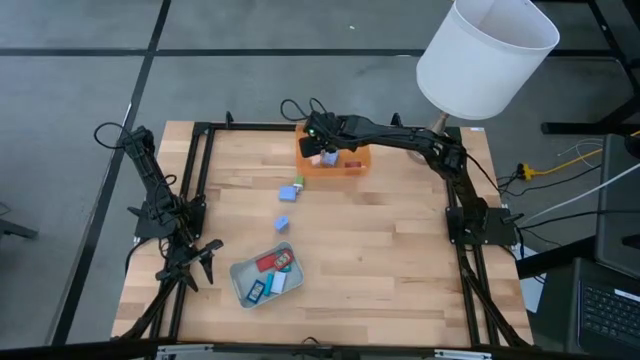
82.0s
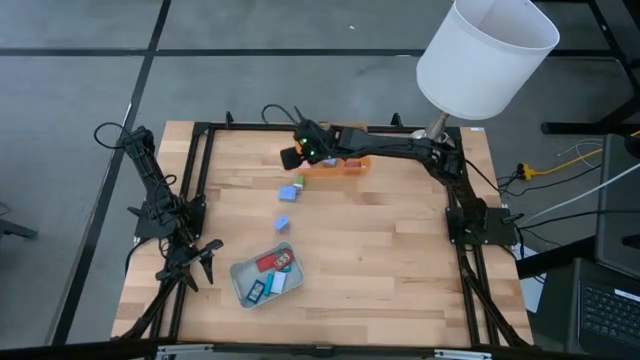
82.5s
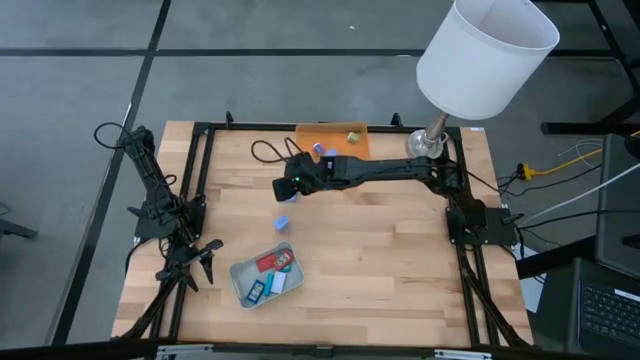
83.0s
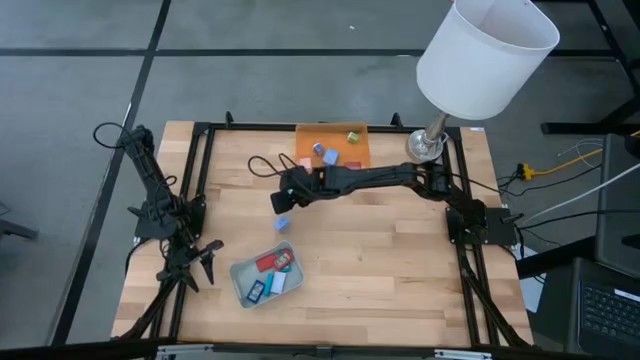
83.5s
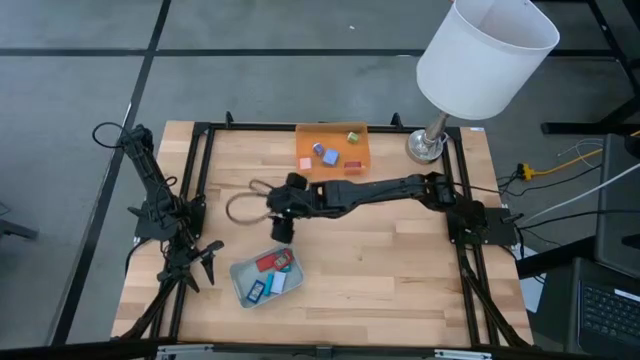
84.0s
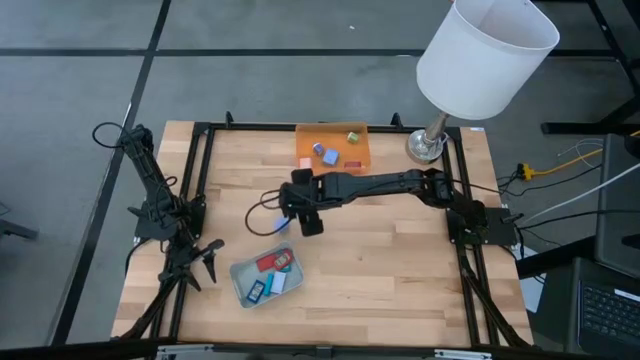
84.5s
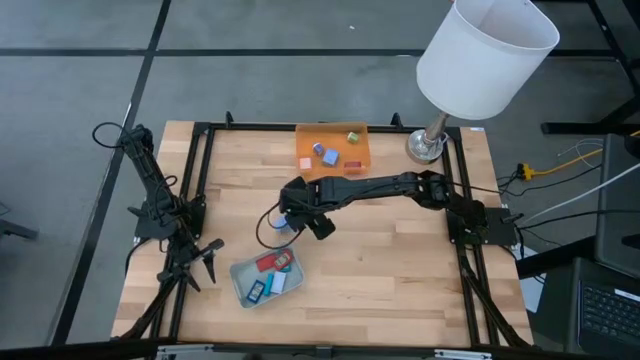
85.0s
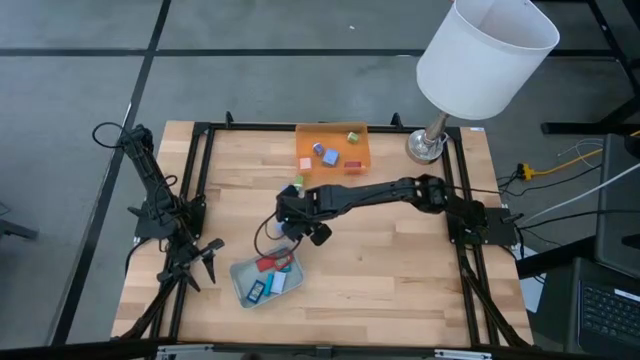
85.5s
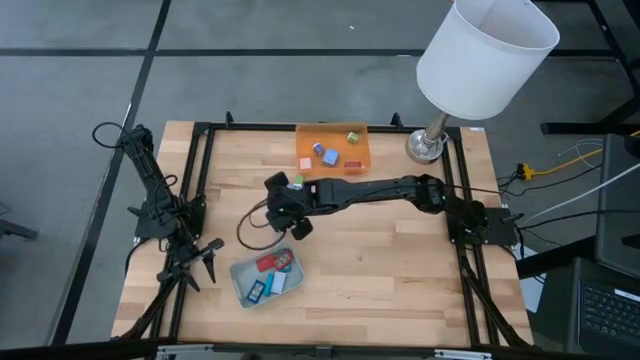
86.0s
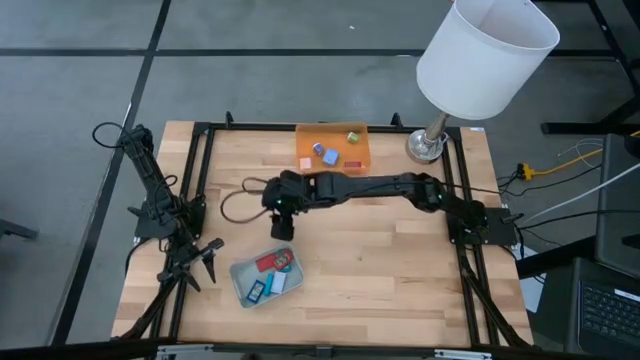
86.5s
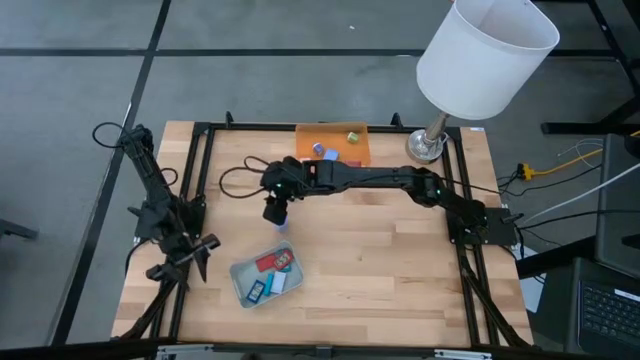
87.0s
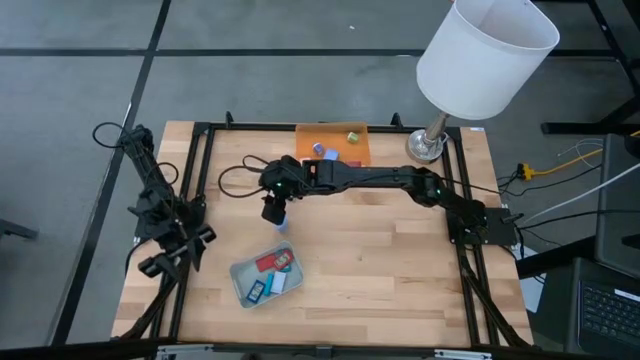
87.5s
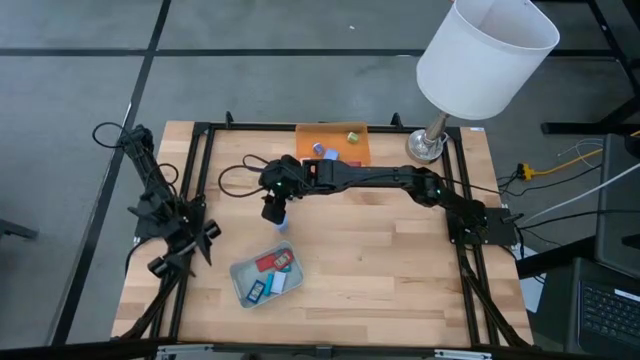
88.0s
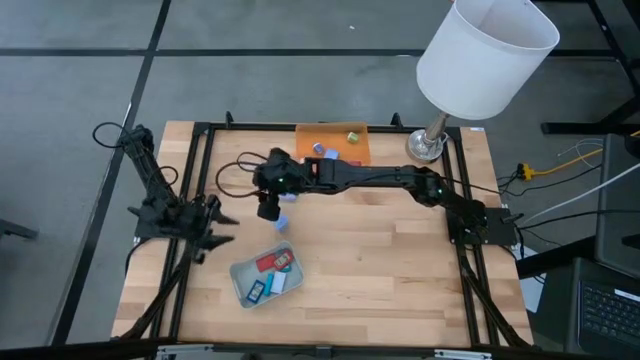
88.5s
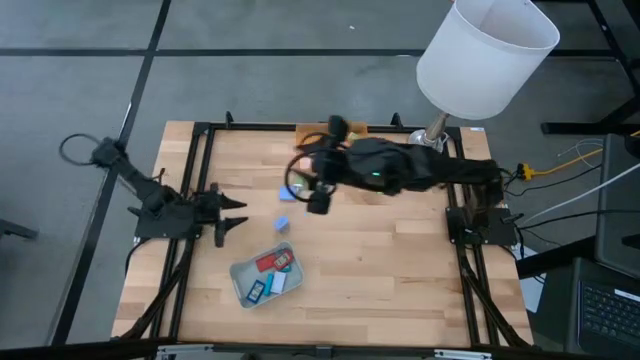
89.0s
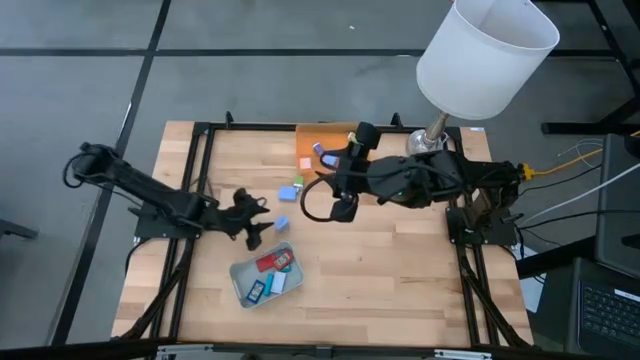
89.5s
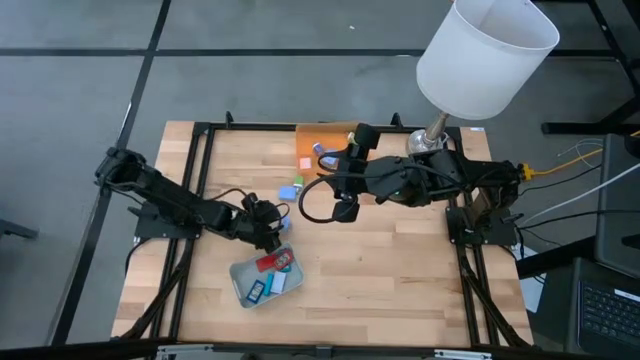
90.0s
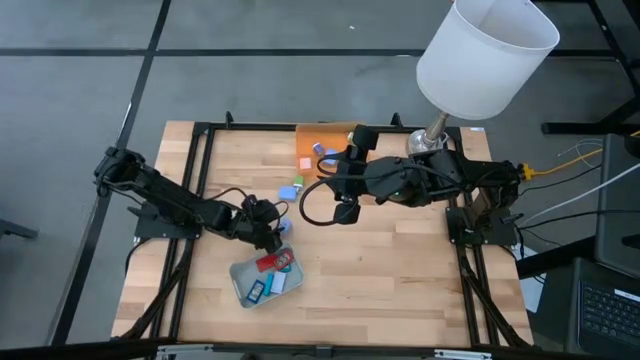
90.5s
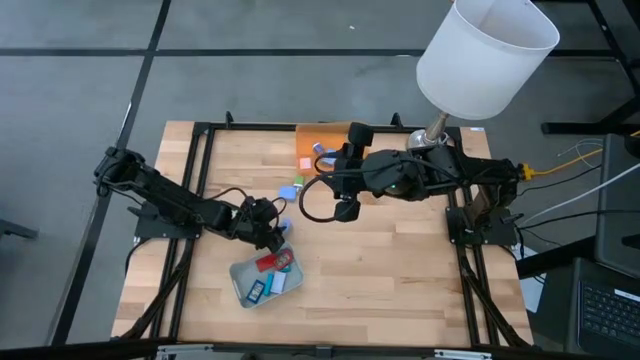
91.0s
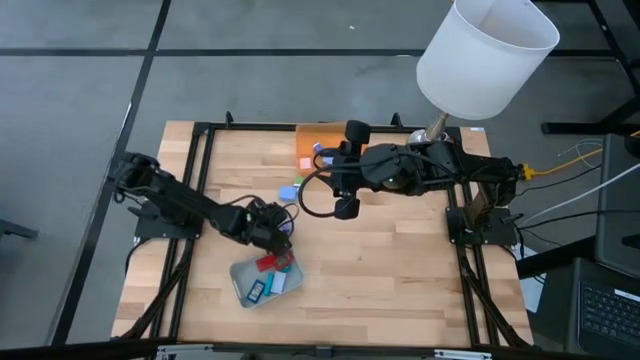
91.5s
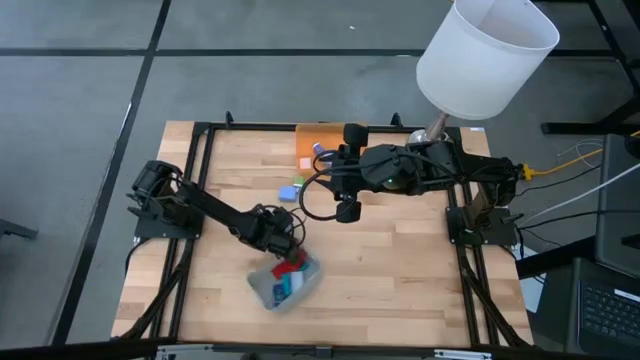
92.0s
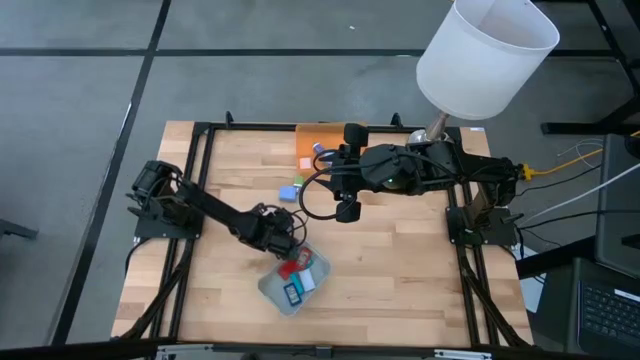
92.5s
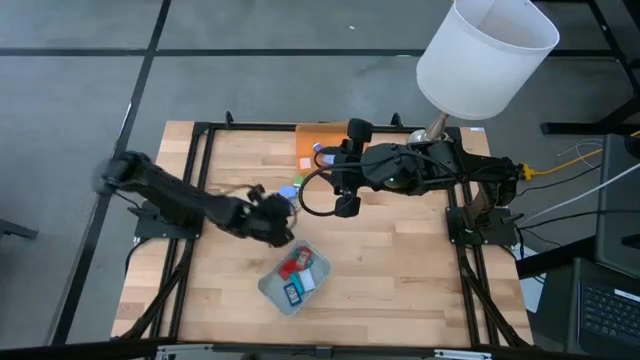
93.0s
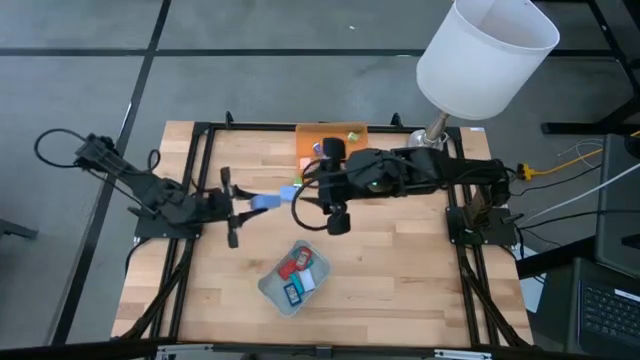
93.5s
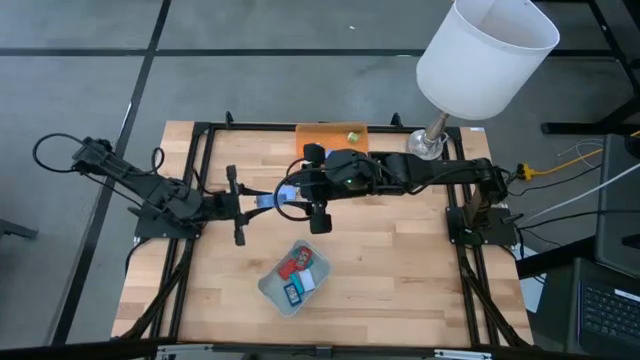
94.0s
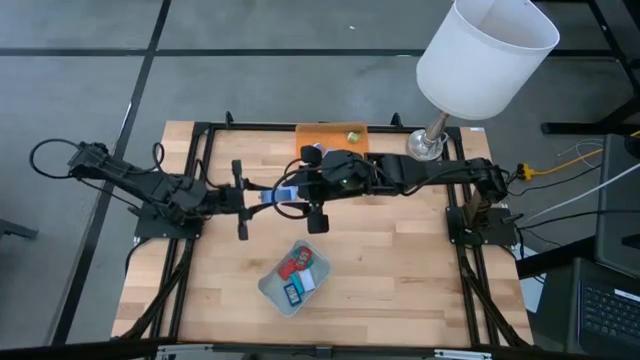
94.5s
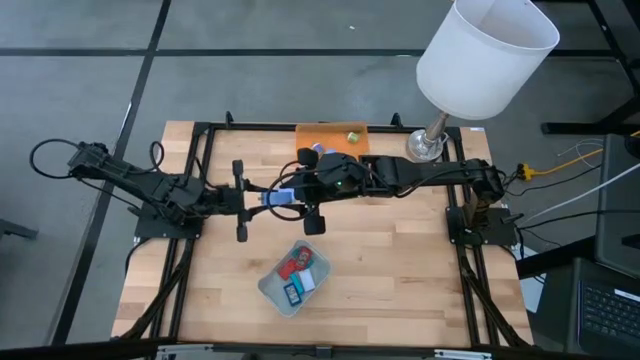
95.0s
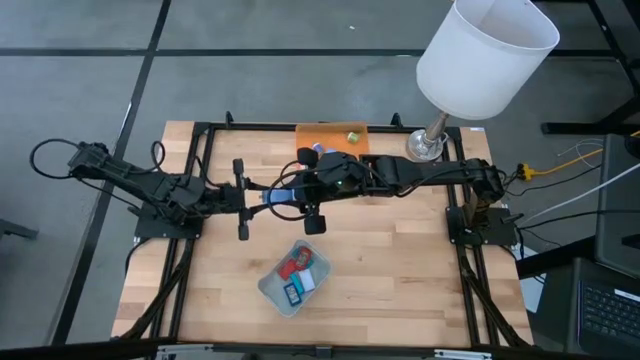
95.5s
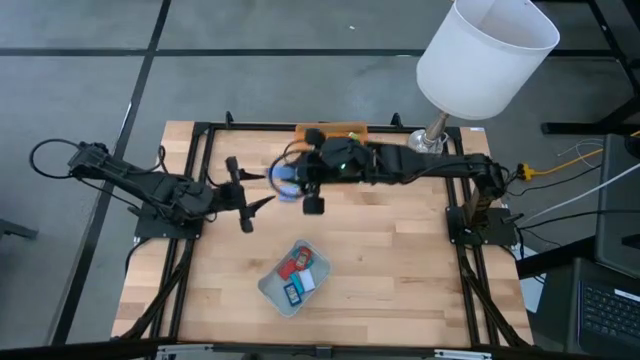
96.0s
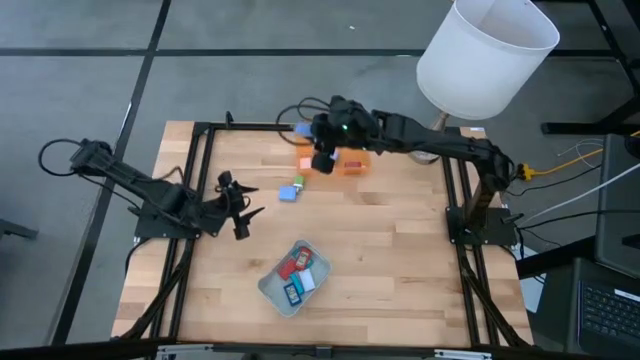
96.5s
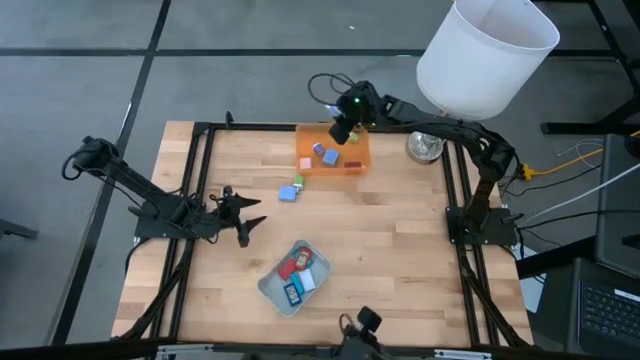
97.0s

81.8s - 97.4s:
Task: Pick & Place Office items
Put the bottom blue charger adapter into the orange bin

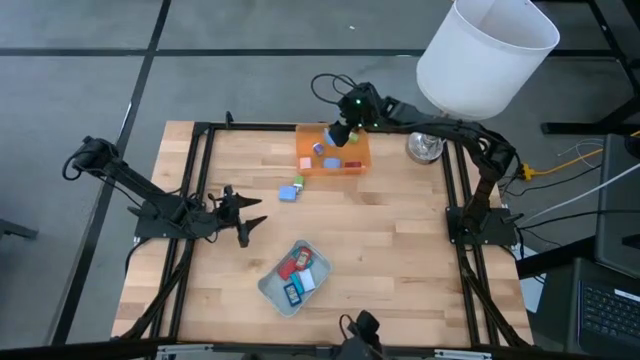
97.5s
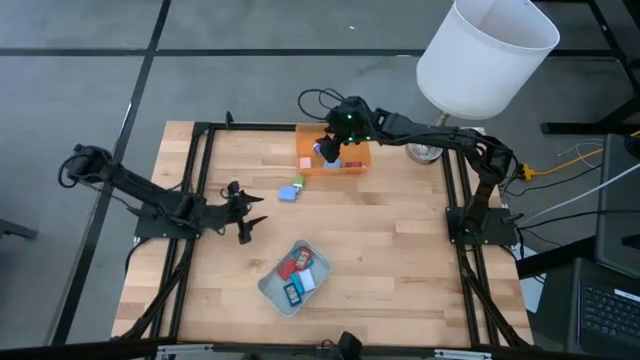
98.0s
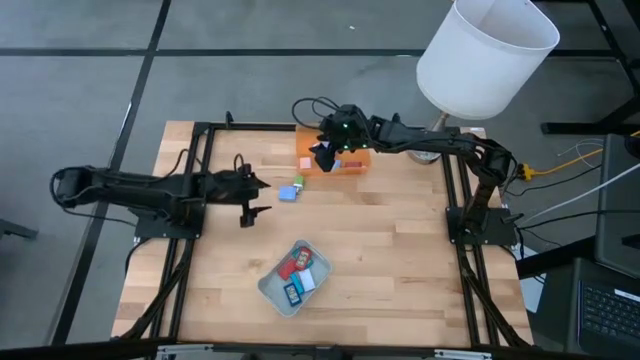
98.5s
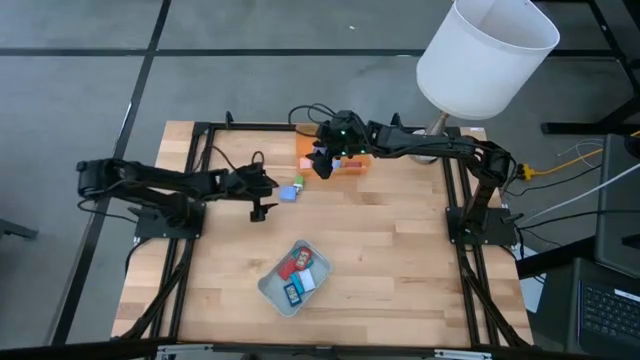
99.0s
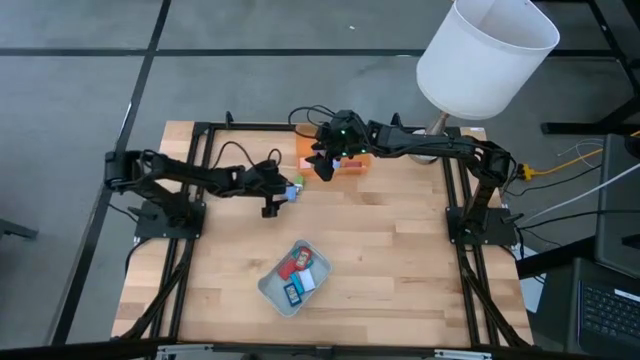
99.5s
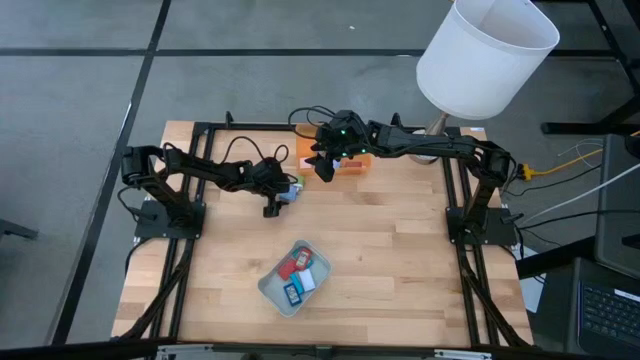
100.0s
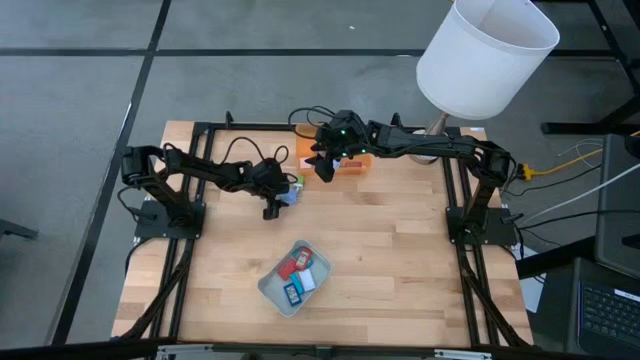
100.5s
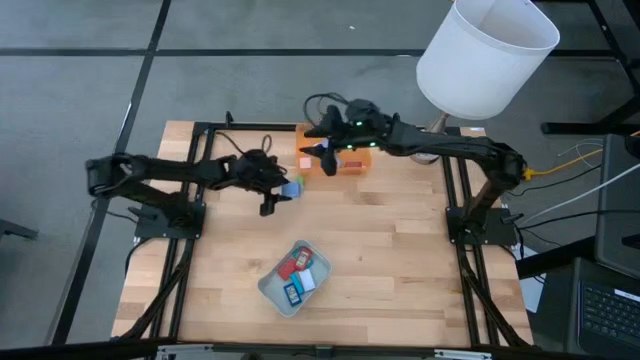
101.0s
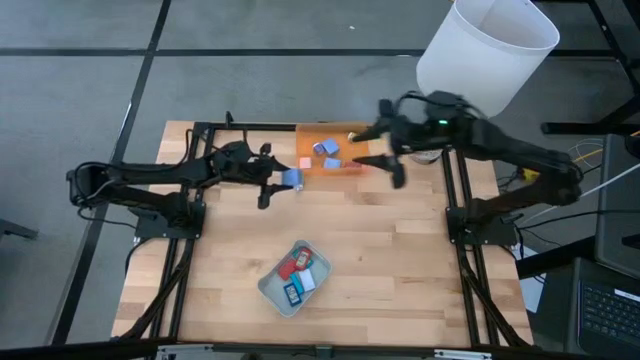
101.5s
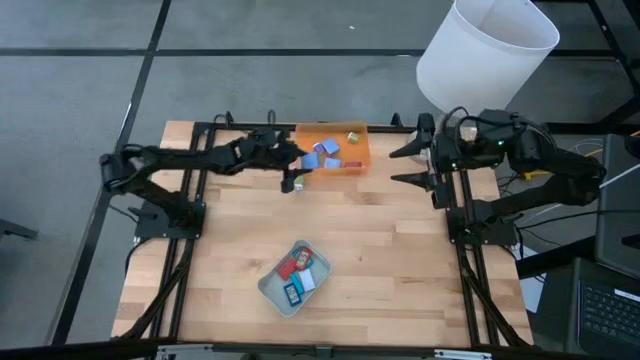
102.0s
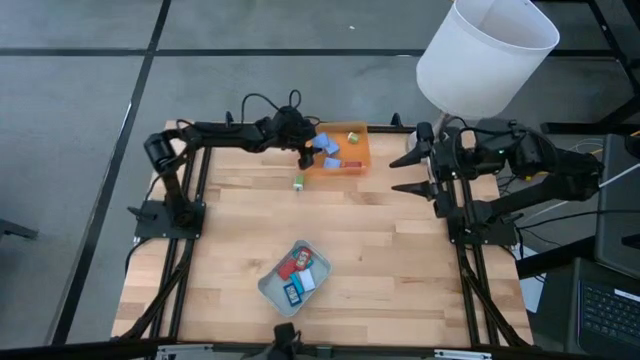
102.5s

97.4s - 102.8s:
Put the blue charger adapter into the orange bin

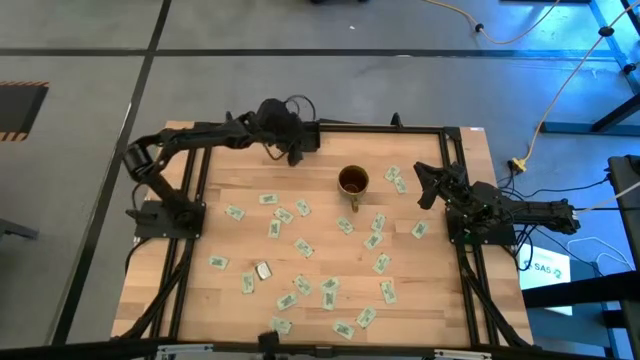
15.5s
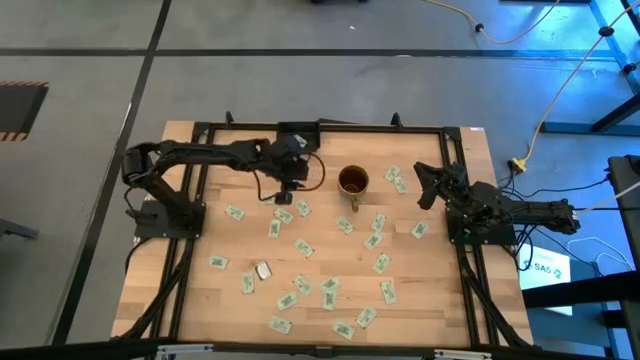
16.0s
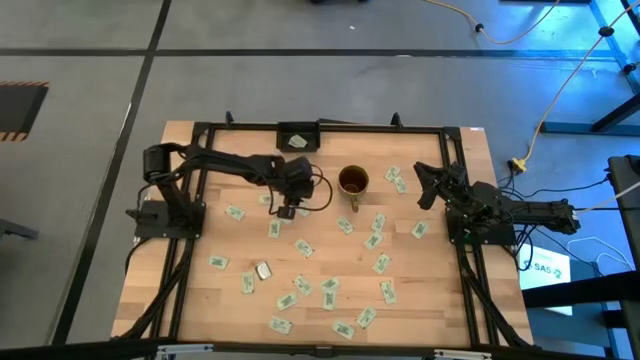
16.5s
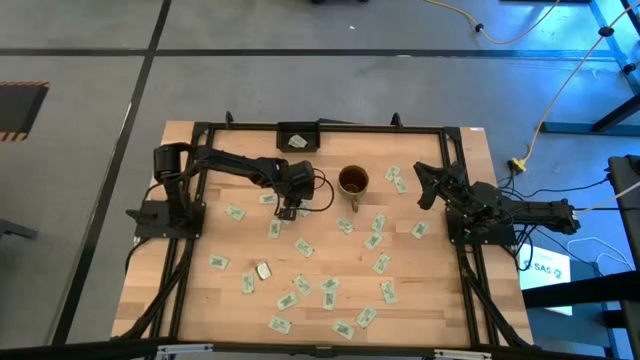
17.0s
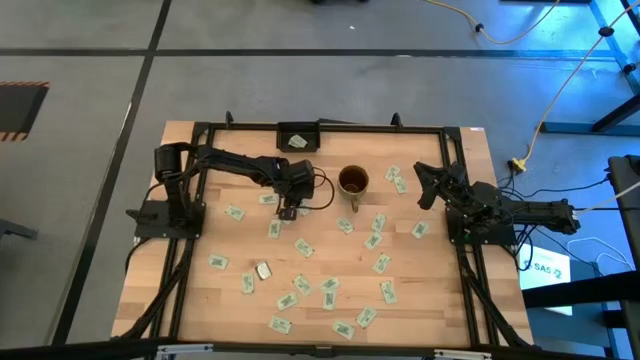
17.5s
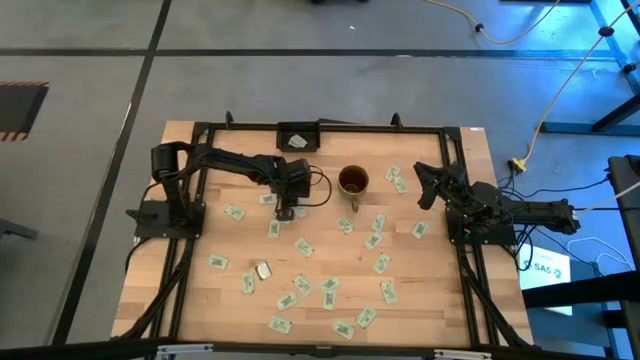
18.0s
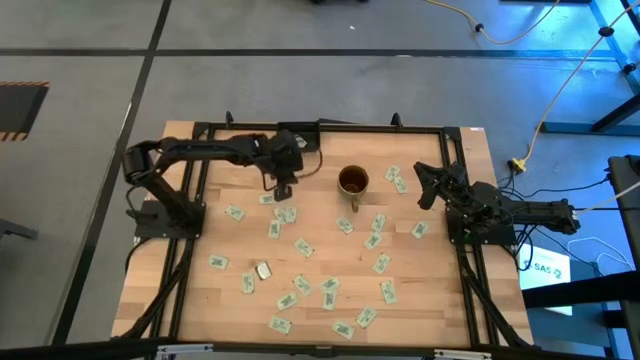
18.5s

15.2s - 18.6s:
Task: Pick and place Stevia / Truvia into bins
Put the stevia packet into the black container
